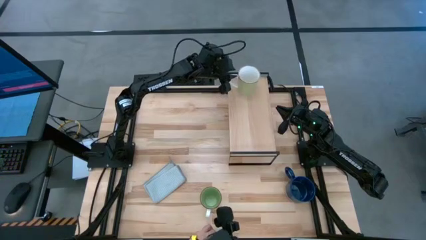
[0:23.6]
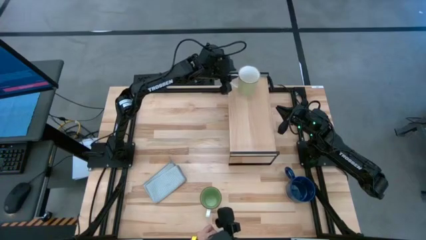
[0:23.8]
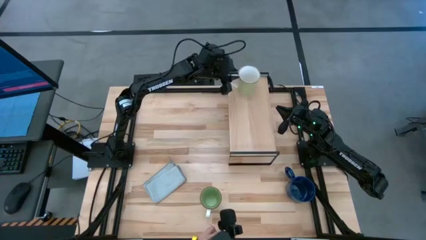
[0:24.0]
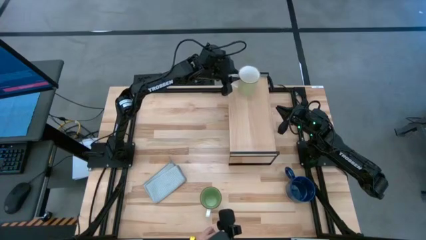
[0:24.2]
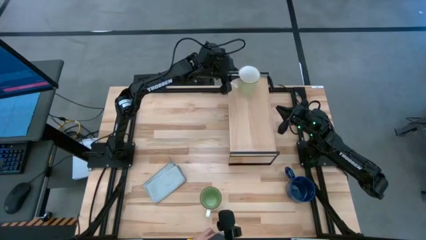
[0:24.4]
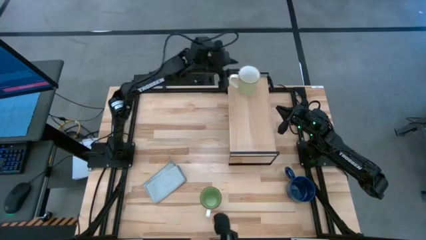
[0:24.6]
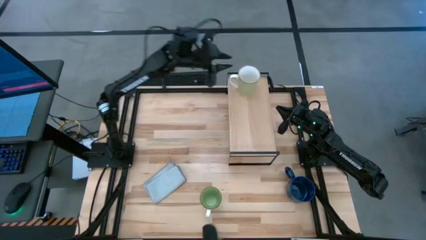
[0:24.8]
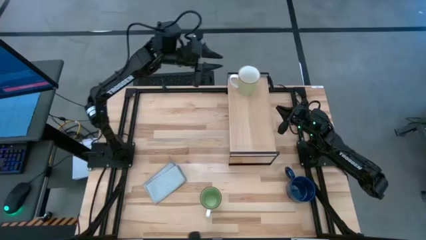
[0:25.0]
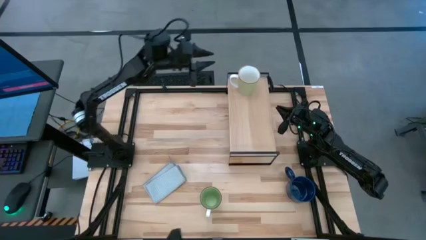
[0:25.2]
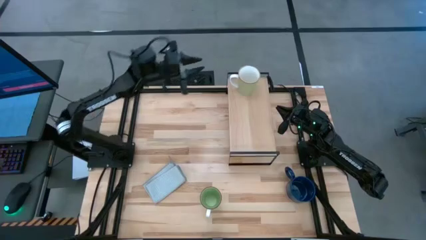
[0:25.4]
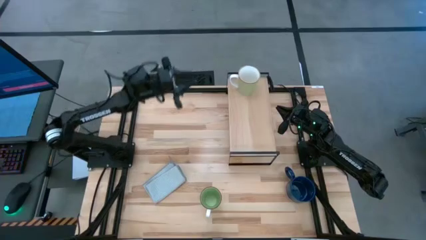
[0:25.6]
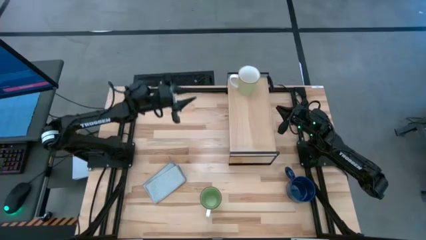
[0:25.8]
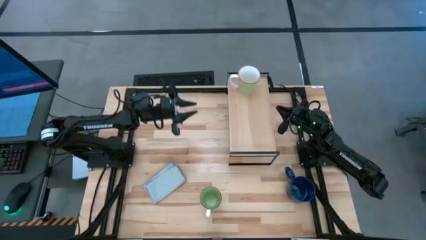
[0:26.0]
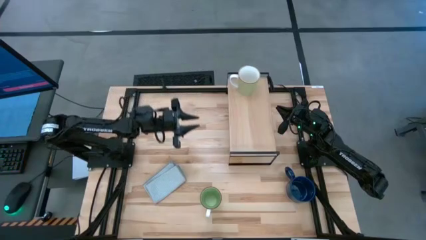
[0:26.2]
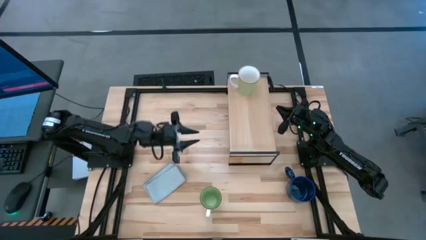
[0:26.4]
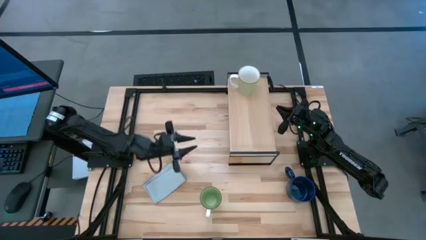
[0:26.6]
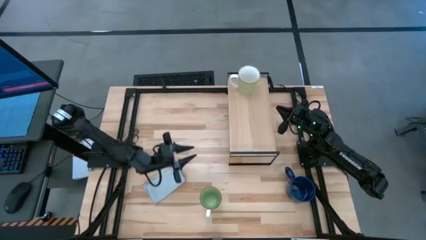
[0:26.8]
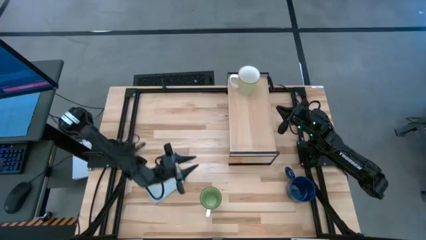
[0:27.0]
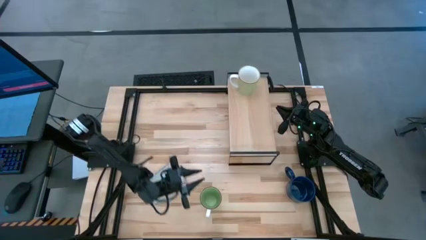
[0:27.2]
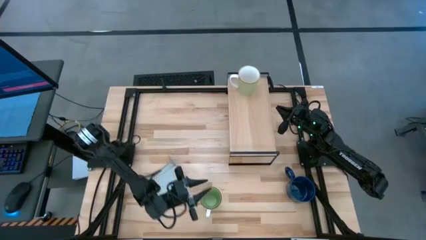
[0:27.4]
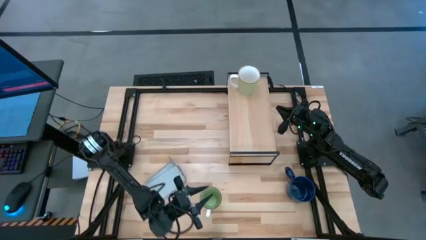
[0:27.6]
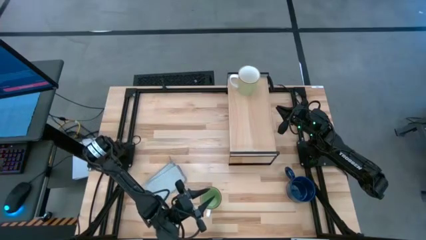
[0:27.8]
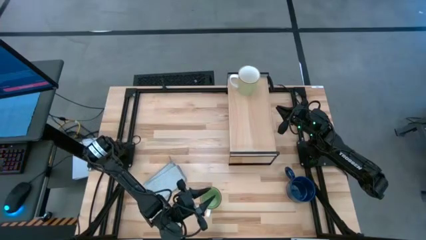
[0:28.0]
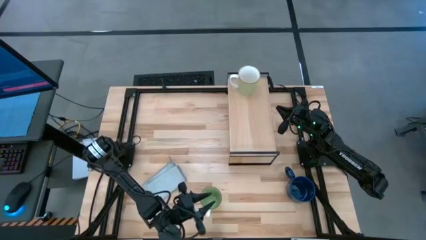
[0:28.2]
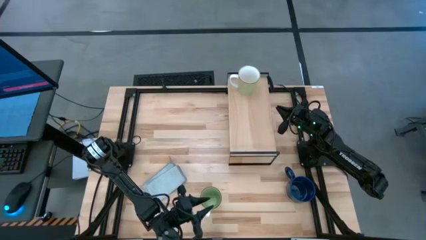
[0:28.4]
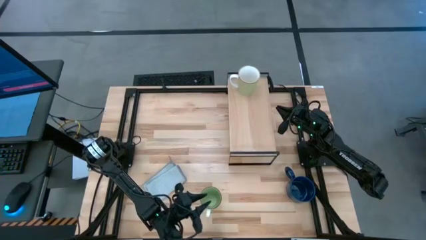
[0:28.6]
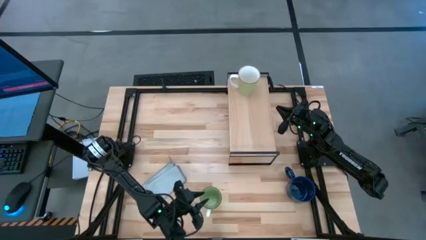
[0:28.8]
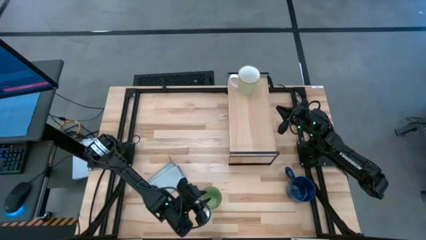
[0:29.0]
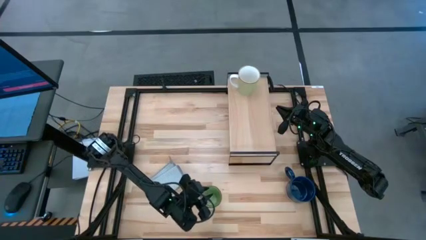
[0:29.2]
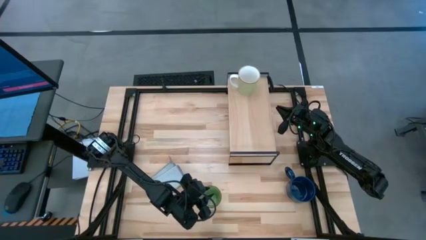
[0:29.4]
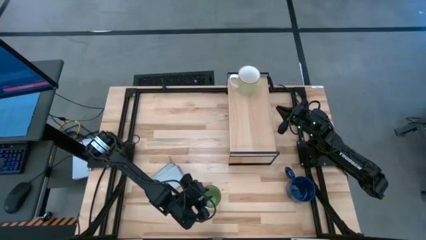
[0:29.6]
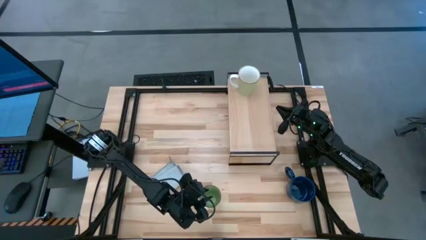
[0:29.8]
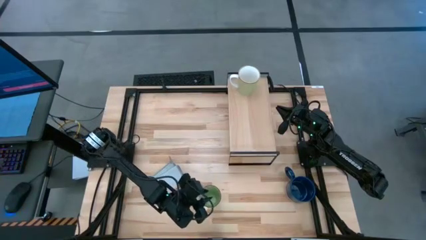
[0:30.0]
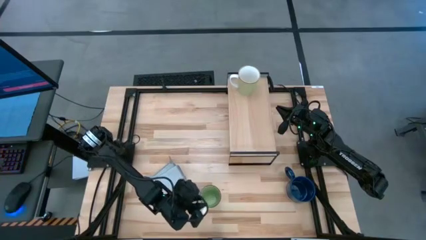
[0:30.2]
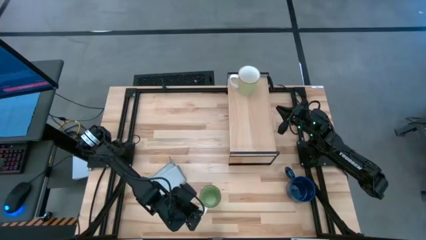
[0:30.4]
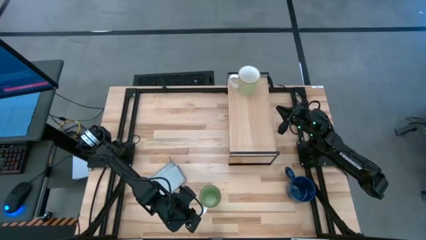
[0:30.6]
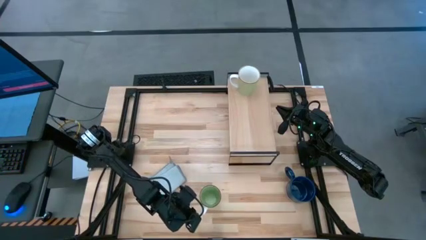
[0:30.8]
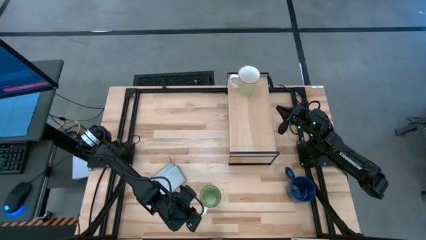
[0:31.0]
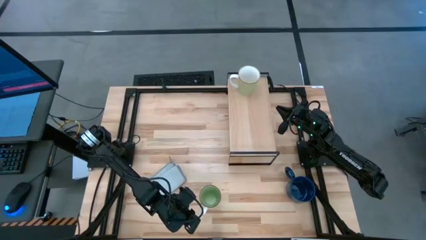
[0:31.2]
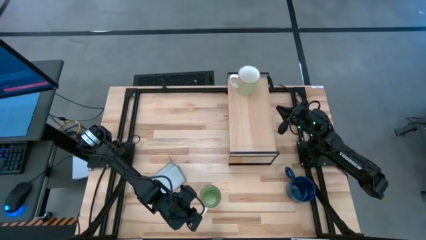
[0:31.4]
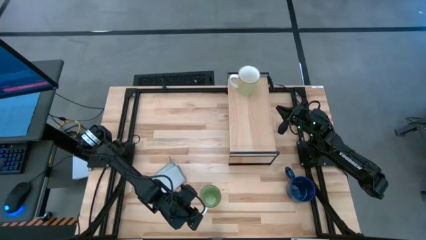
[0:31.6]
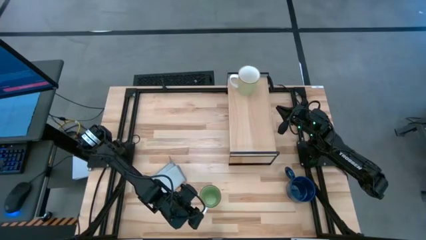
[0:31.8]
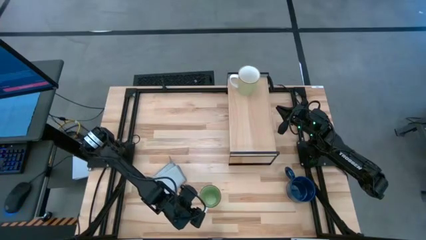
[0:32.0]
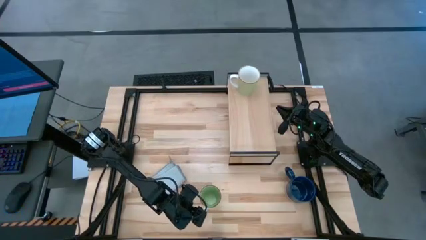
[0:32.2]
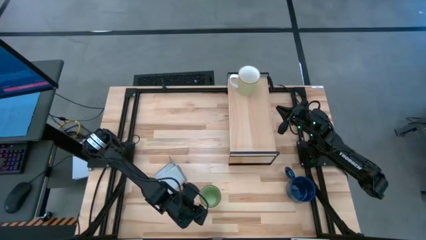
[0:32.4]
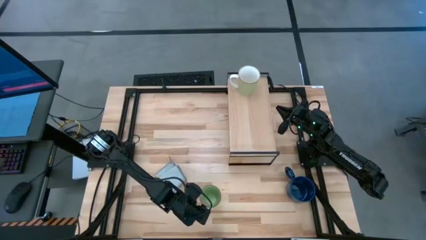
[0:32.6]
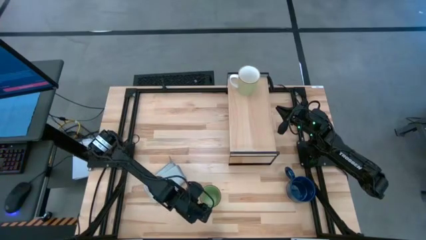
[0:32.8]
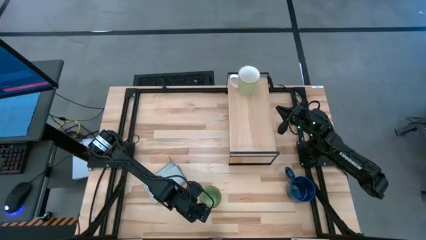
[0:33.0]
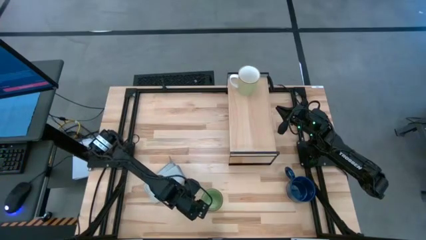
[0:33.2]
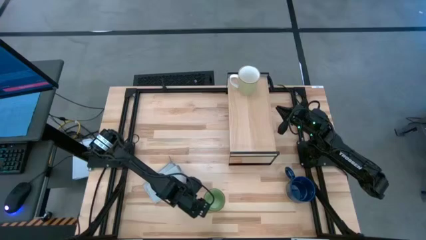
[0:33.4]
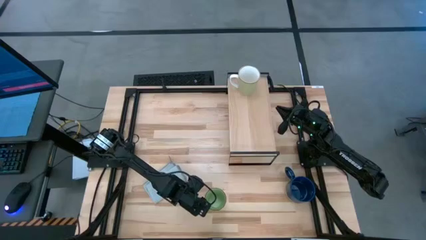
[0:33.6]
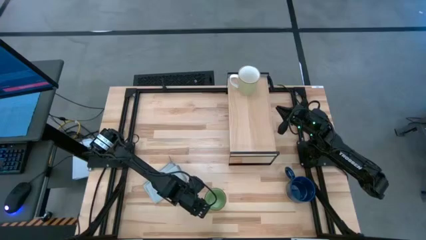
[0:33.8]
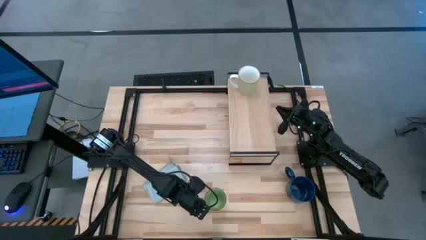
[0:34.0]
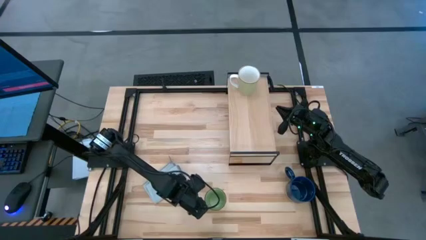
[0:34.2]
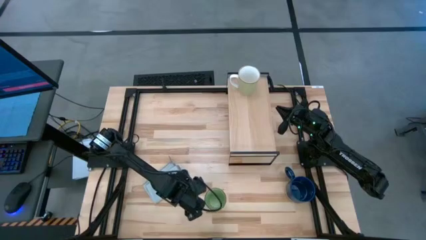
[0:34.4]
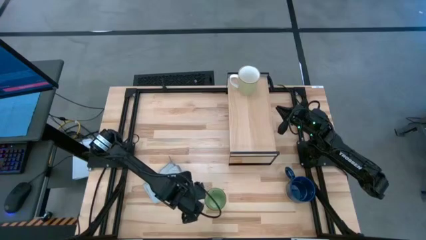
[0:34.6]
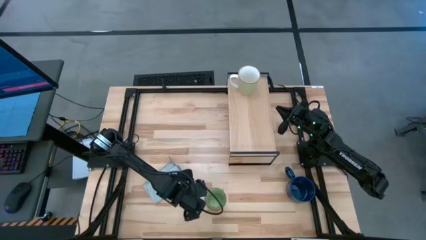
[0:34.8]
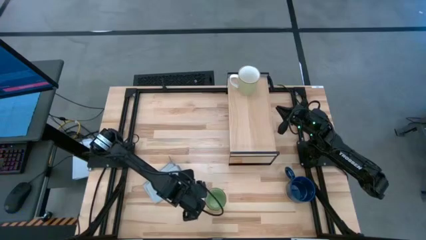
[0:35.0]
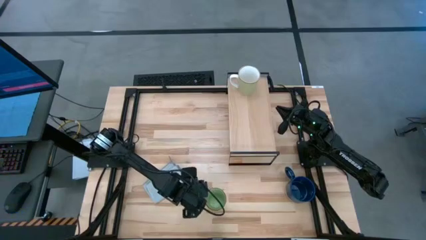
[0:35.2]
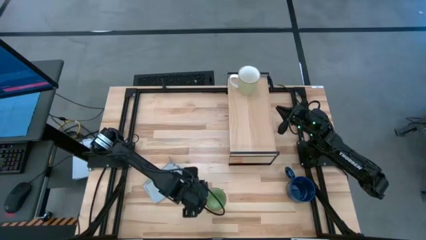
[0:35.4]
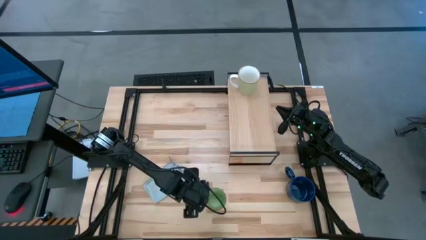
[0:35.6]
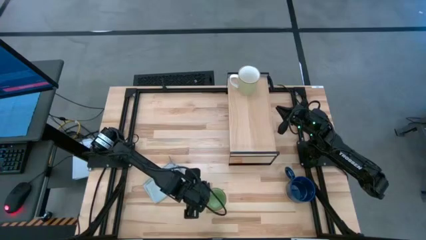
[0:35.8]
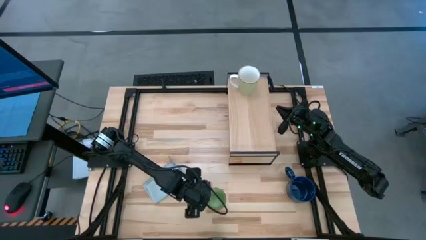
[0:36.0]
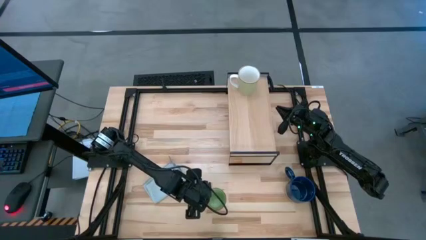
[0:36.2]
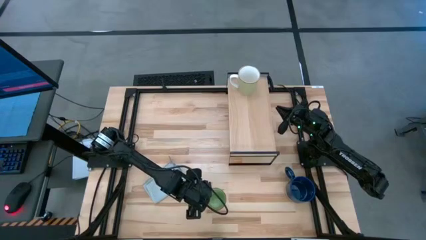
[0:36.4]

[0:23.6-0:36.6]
Task: Stack small to large cups/mugs on shelf
Put the green mug on the shelf
